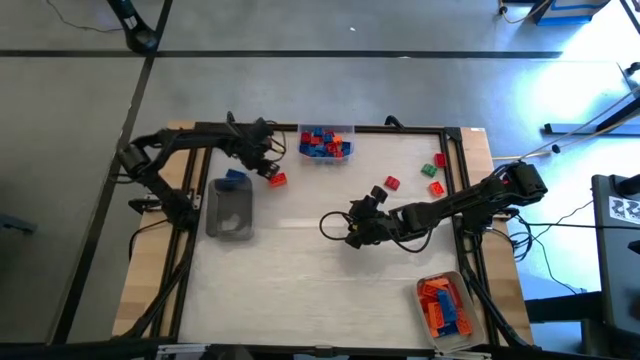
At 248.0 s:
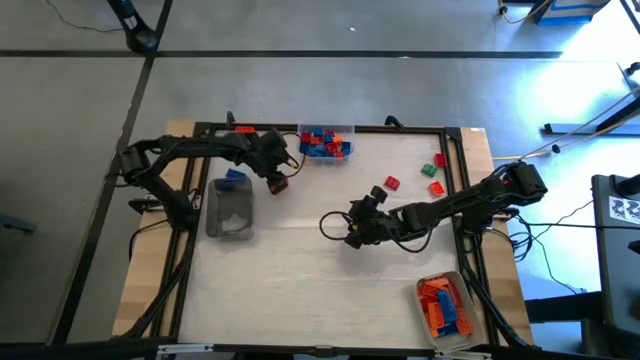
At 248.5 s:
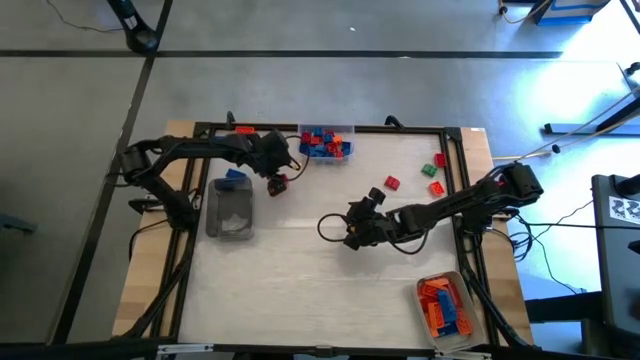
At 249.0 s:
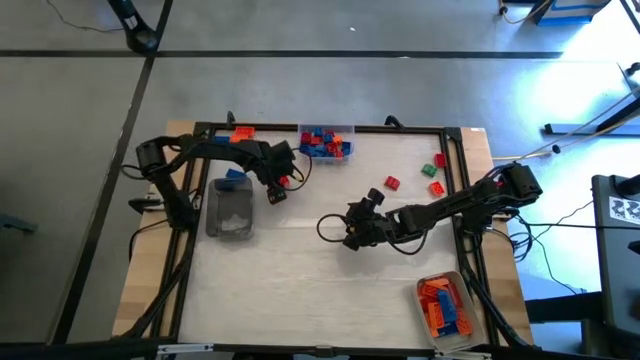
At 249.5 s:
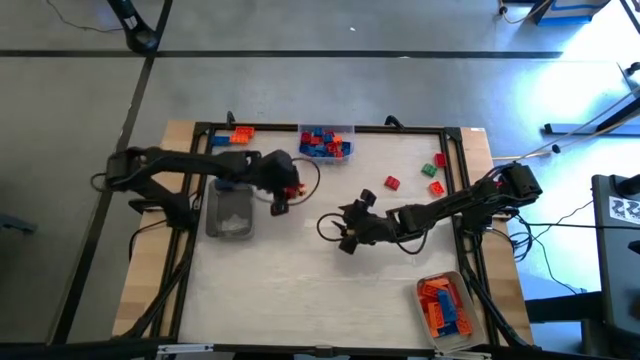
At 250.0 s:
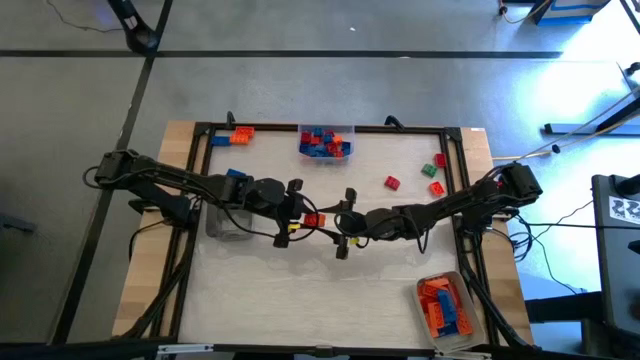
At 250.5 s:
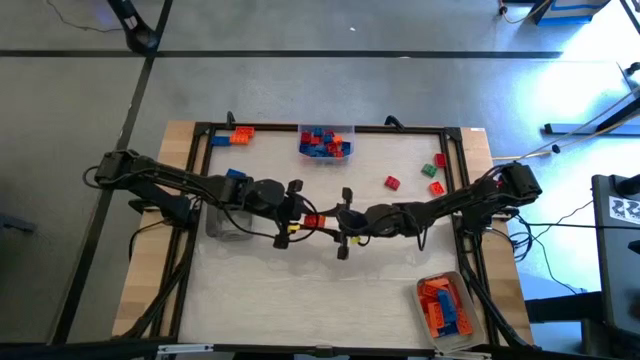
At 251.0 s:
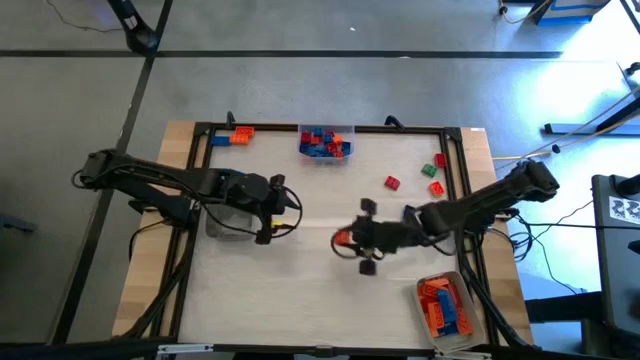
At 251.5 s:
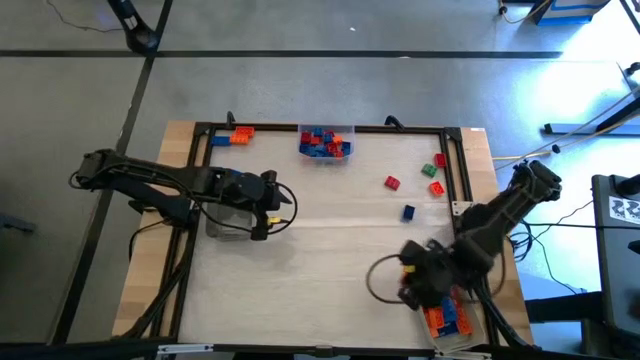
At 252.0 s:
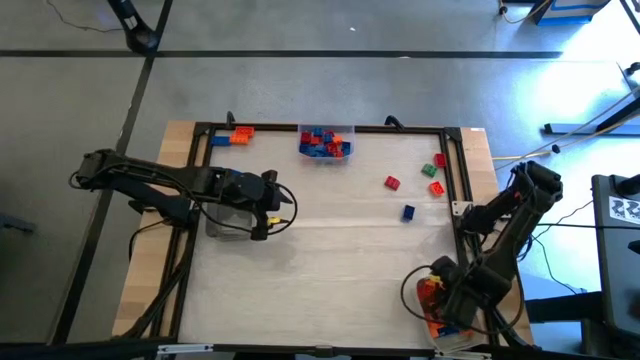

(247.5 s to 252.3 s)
Task: Sort blocks by size
Put the orange 8 stud game piece into the gray bin

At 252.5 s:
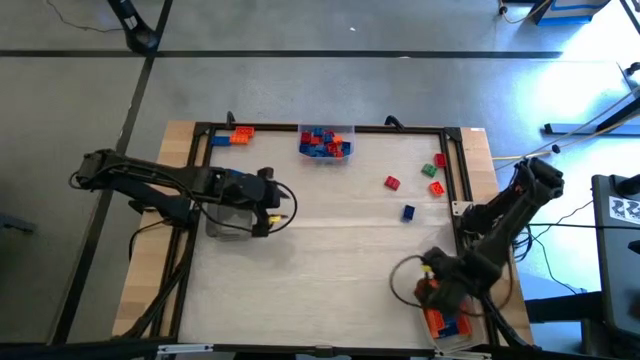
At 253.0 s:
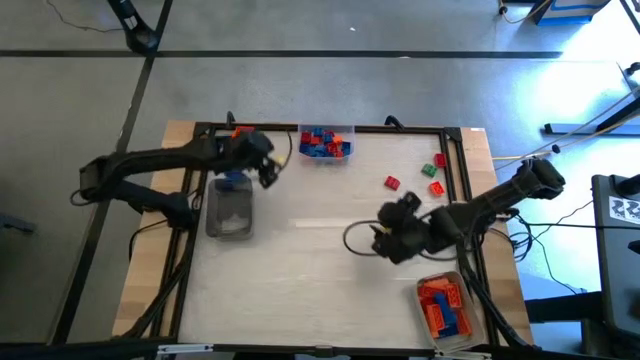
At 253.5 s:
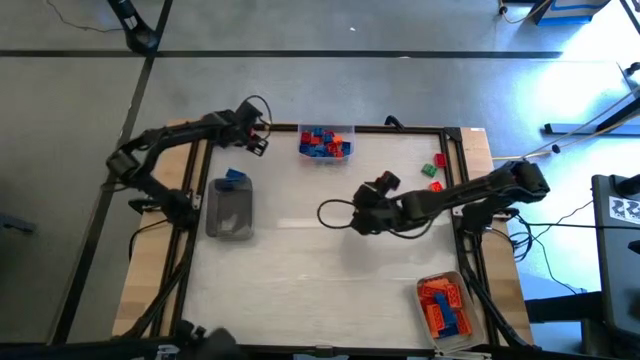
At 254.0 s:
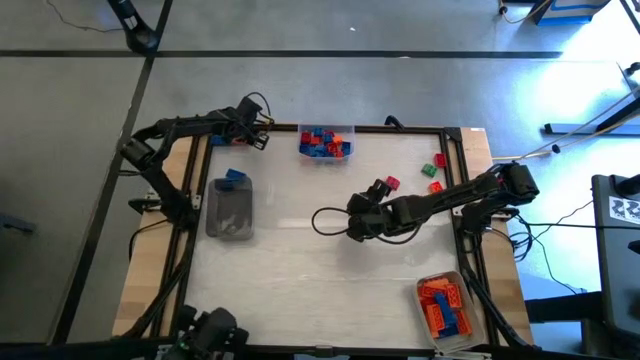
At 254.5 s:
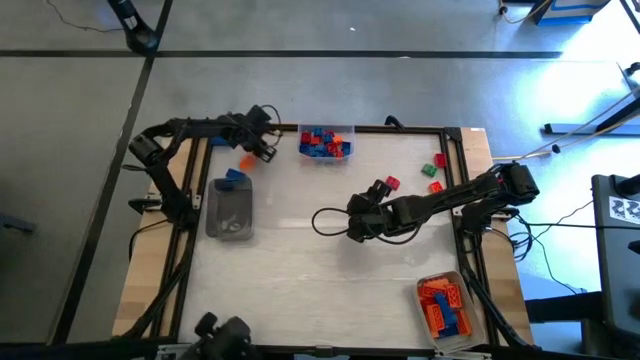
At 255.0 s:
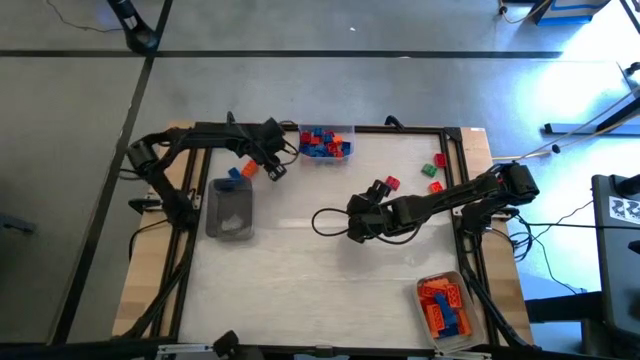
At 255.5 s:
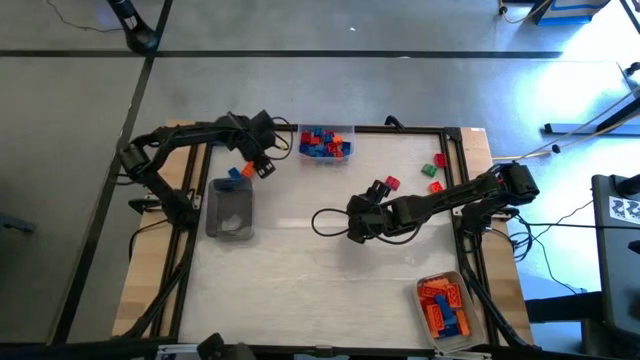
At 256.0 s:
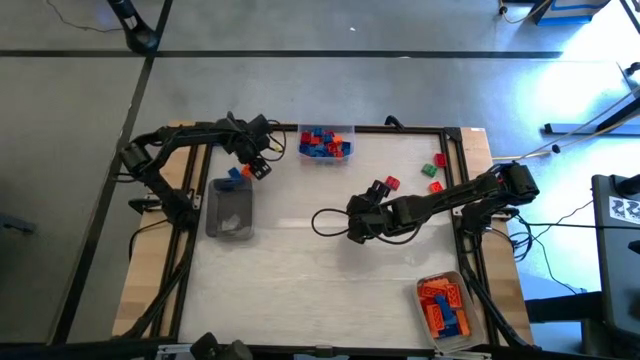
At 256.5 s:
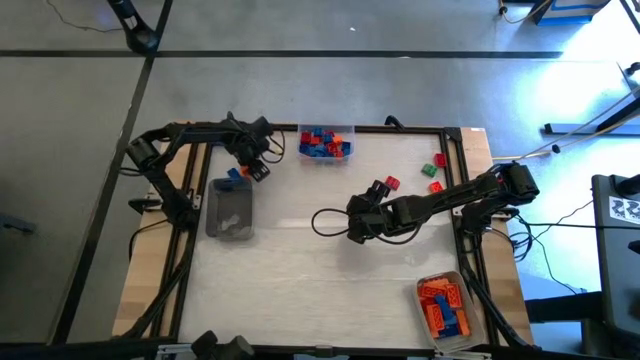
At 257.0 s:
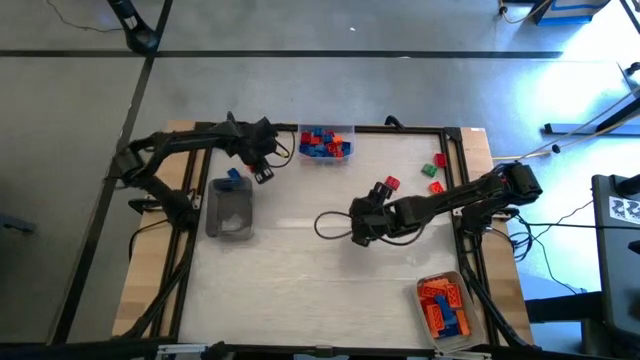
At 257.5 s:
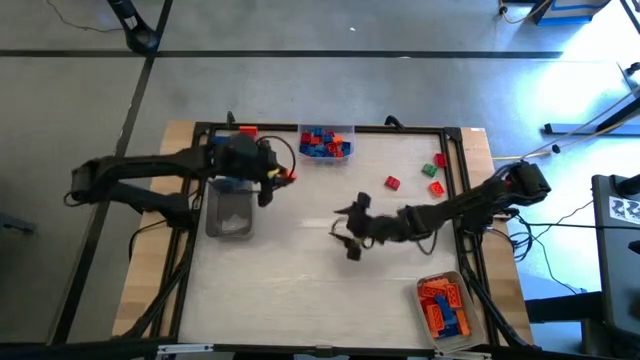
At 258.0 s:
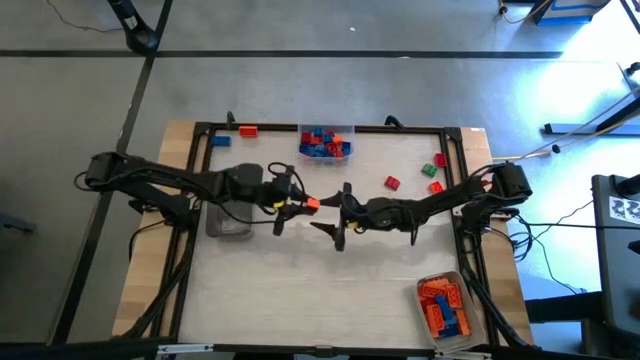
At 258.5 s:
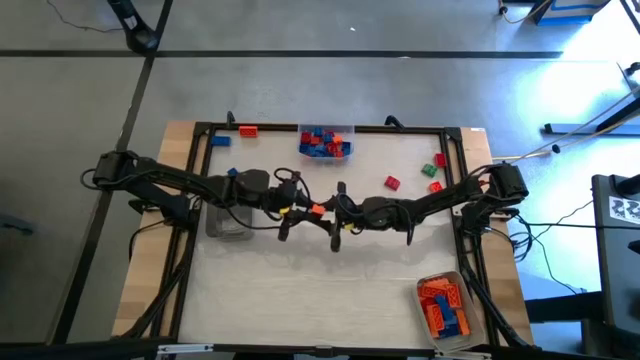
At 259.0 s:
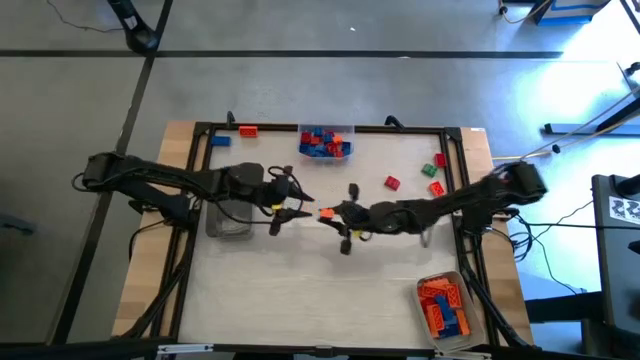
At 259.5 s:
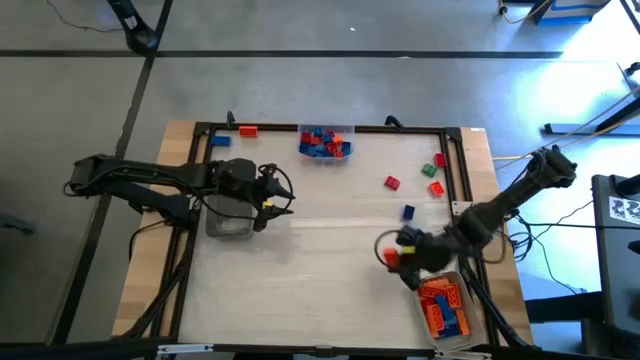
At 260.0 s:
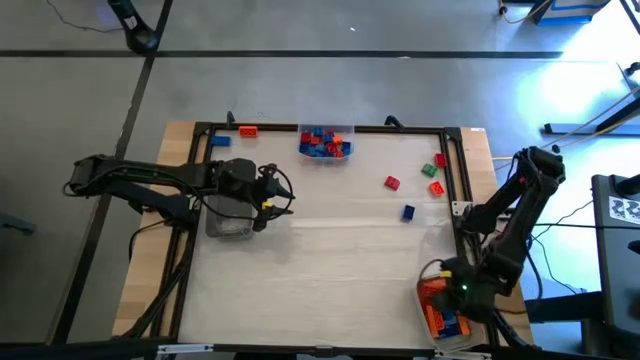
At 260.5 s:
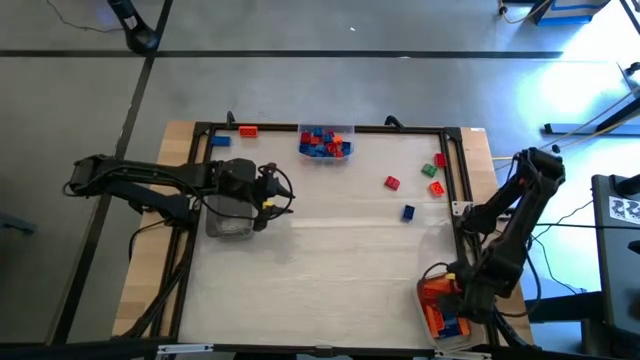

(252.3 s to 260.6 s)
Put the orange 8 stud game piece into the gray bin

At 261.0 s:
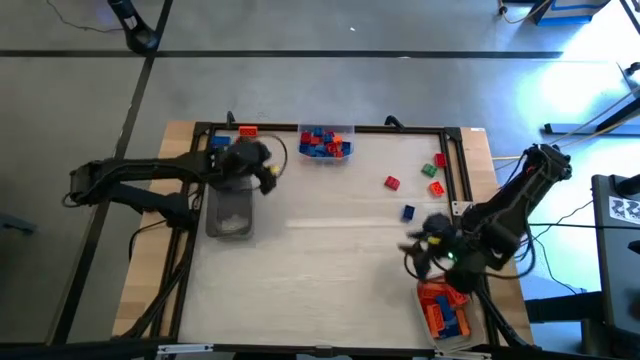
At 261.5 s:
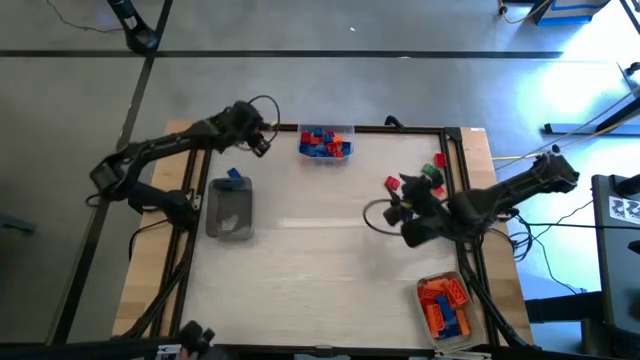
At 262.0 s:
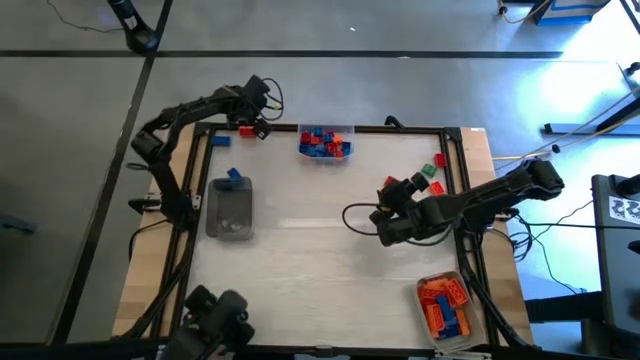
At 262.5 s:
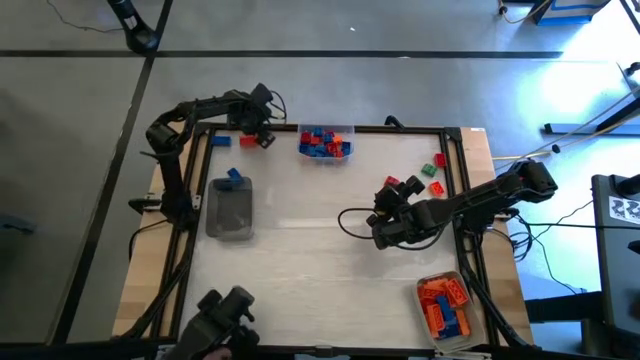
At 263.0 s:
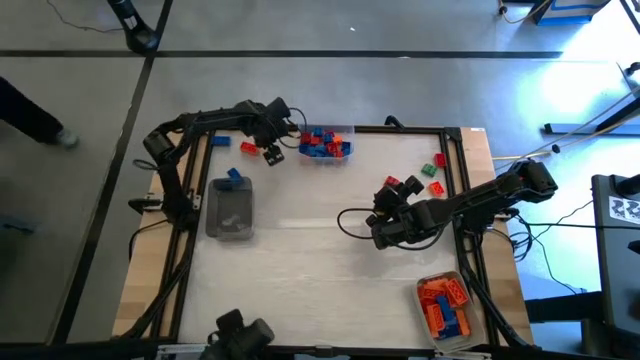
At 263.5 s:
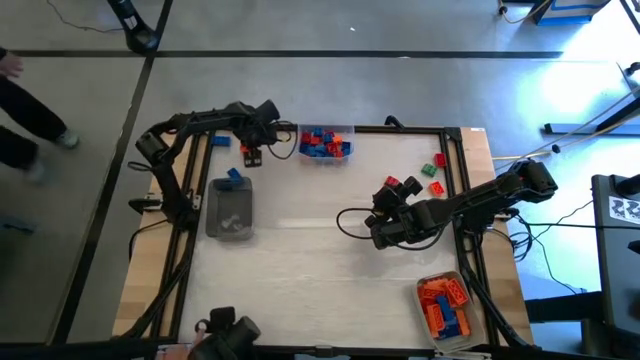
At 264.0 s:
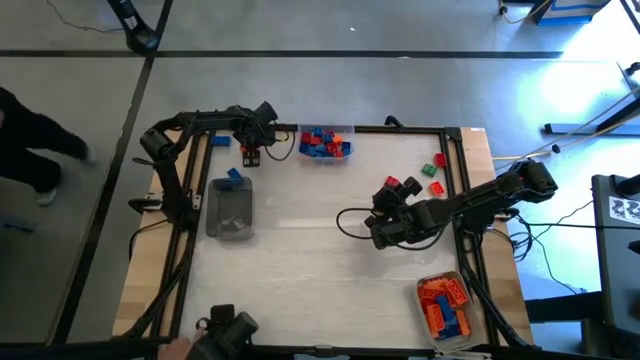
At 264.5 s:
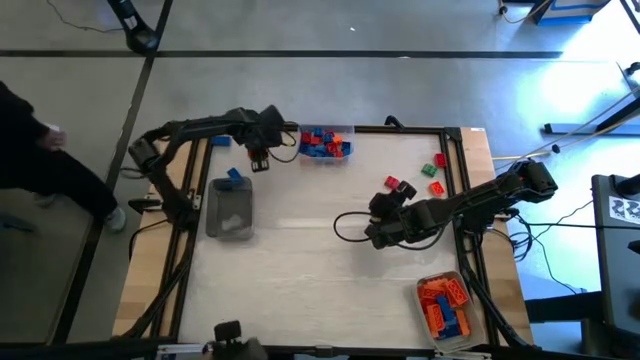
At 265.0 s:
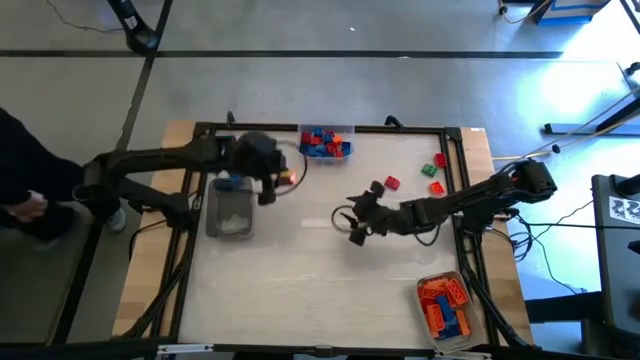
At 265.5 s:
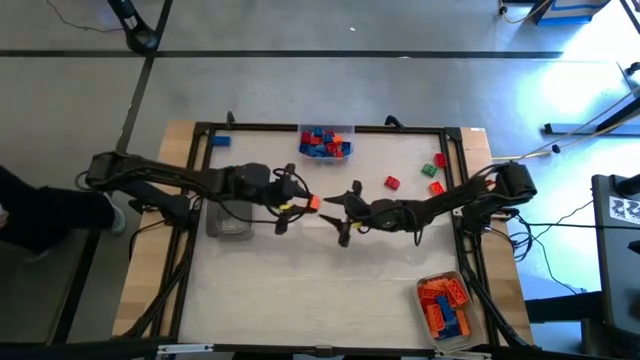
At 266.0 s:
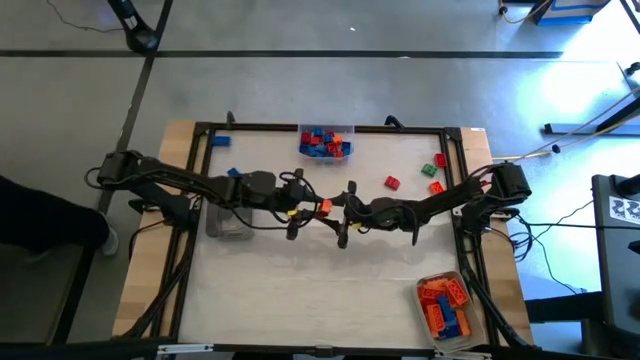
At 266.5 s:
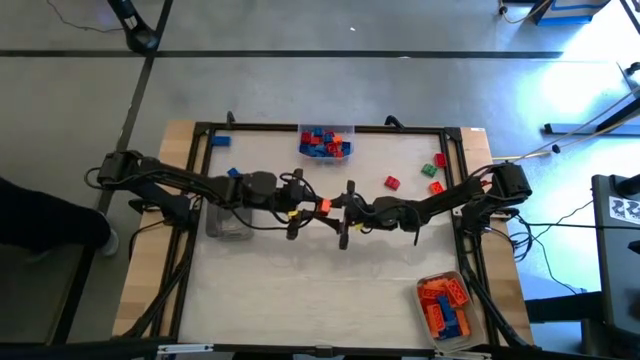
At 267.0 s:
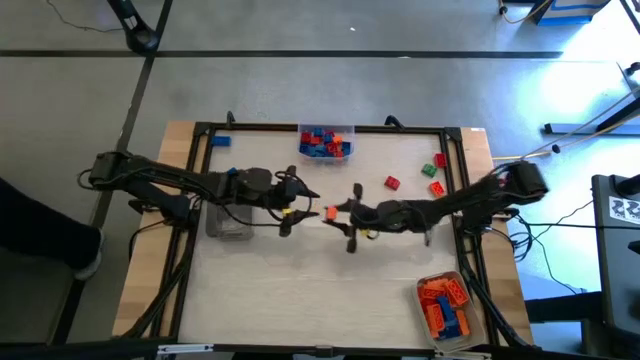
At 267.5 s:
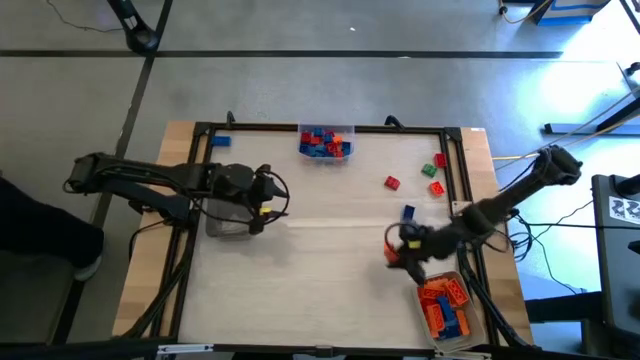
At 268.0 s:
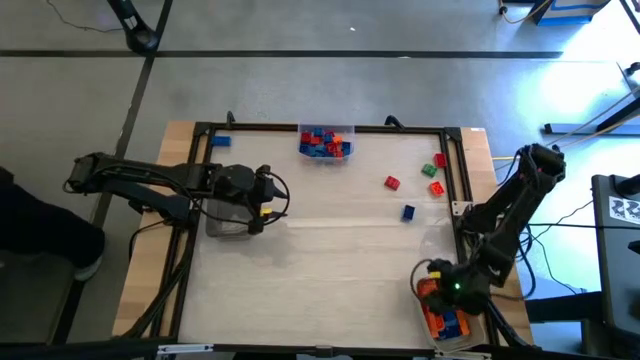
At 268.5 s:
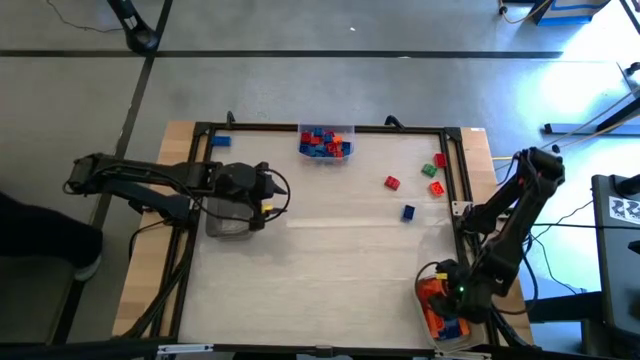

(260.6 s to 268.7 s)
Put the orange 8 stud game piece into the gray bin
